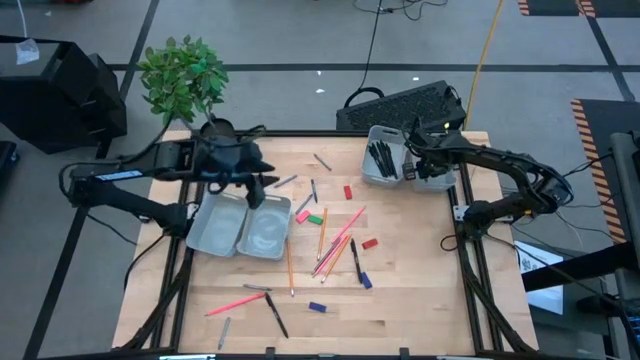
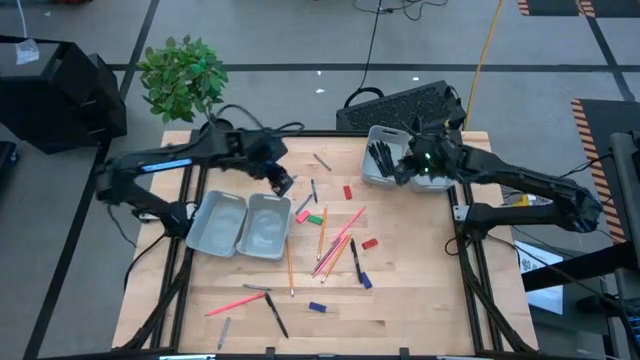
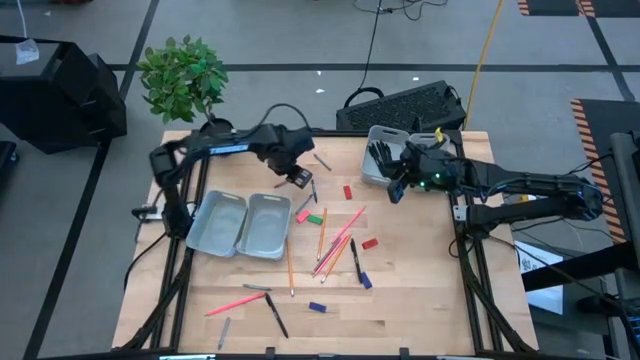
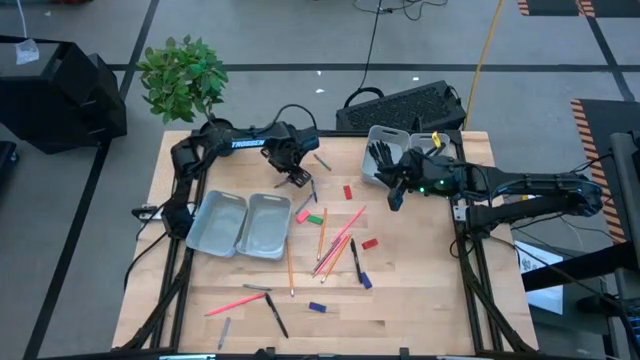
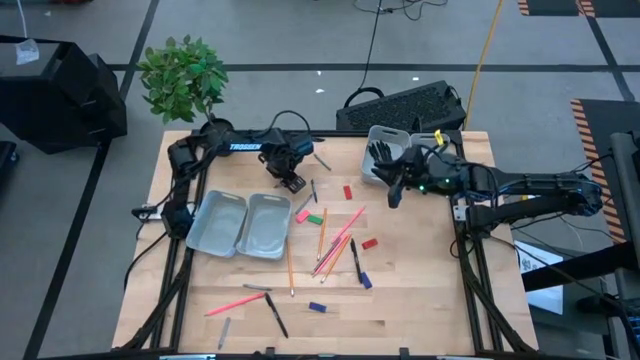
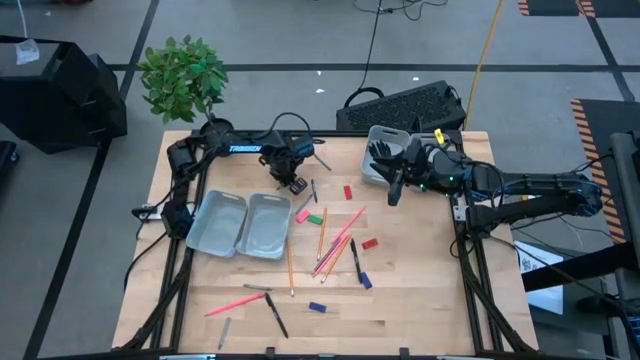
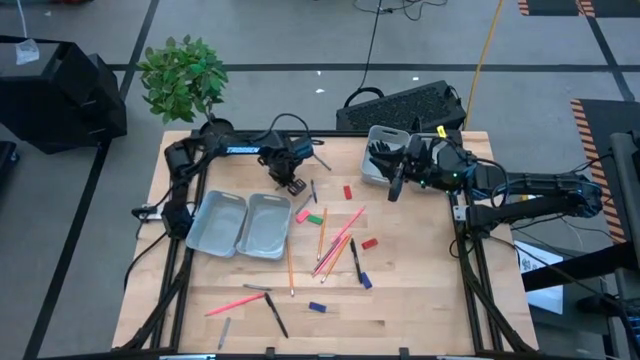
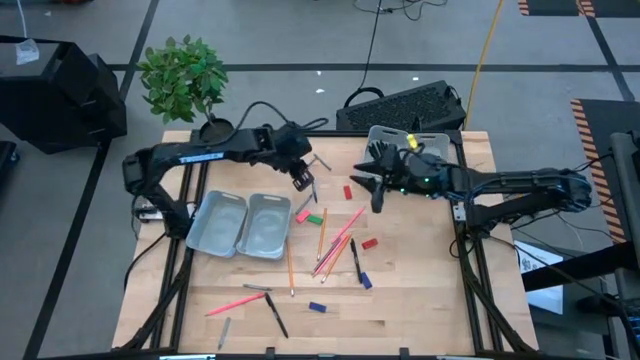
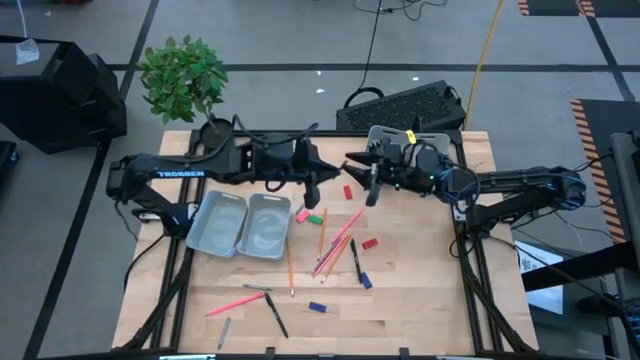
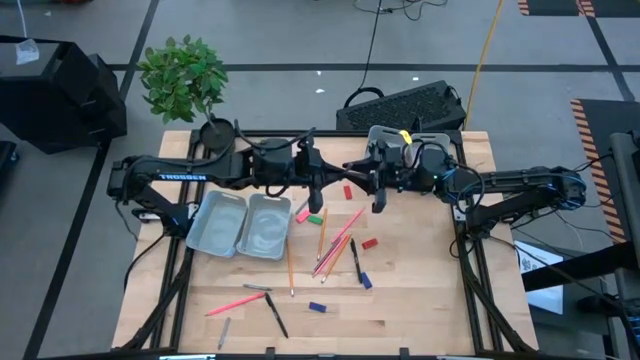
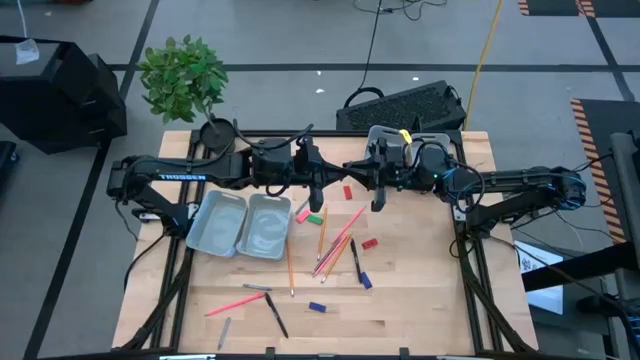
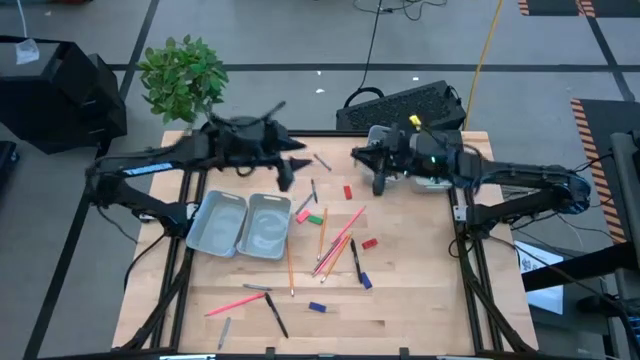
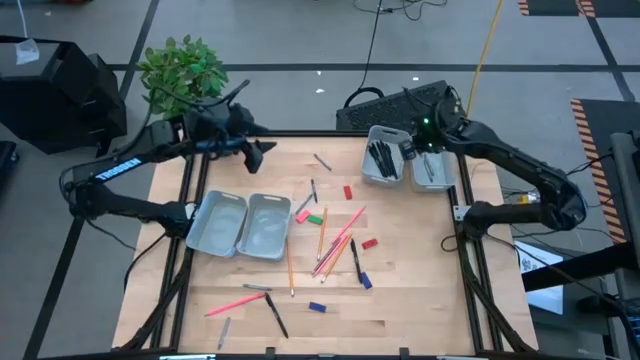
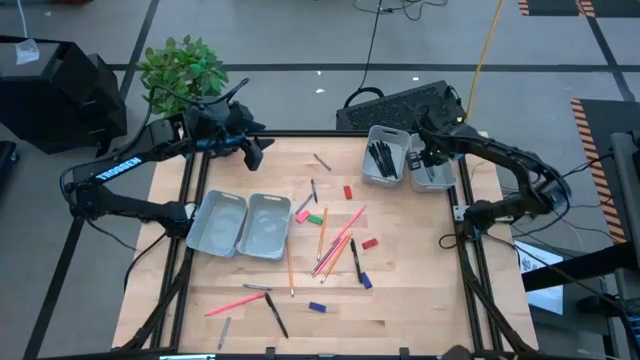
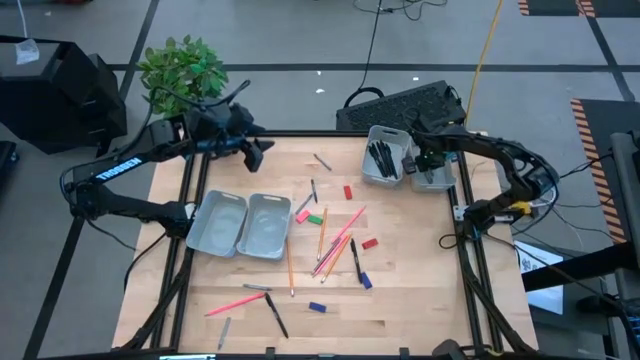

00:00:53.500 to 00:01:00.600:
Task: Sort crayons/erasers/pens/pencils in bins
Put the gray crayon into the top right gray bin

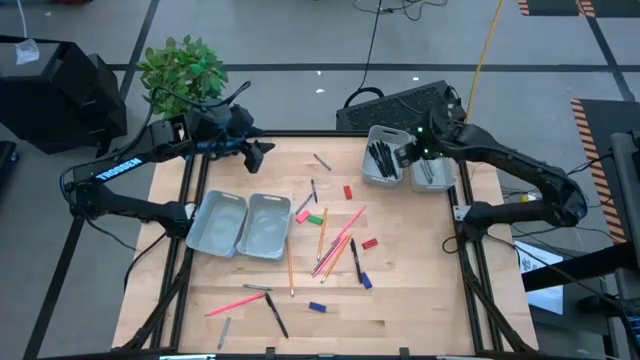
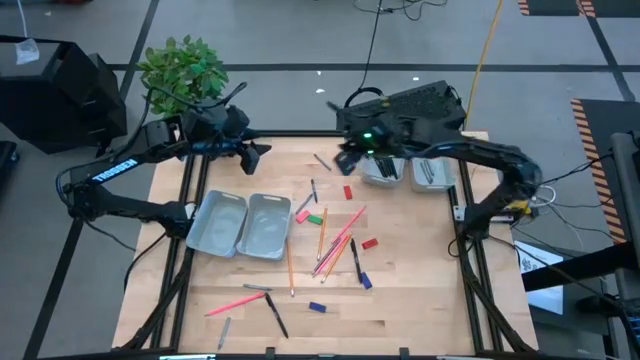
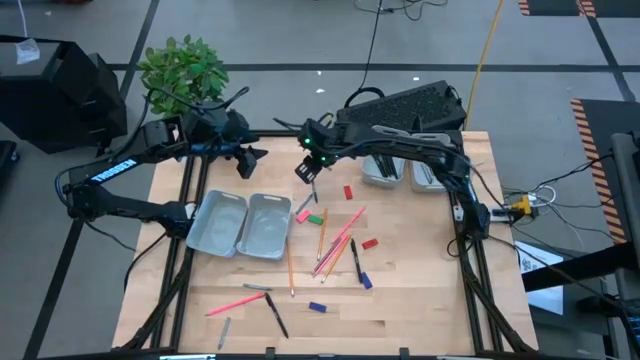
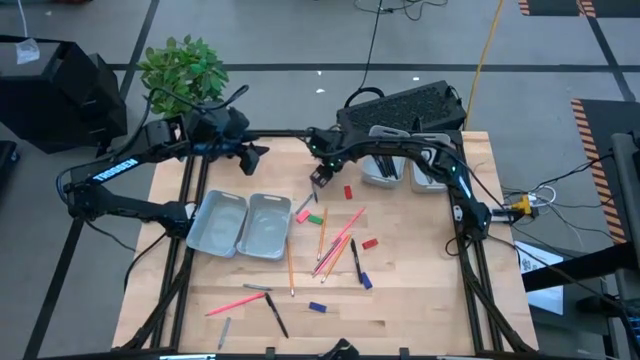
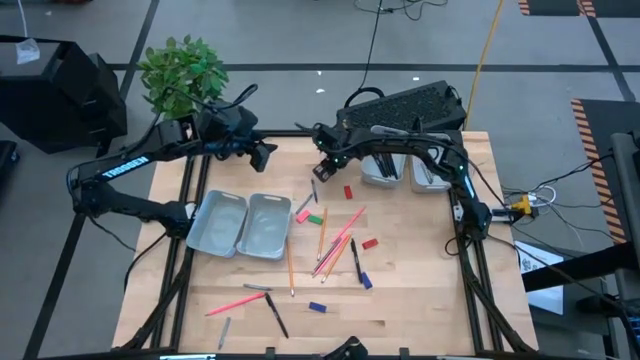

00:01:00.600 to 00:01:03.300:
Put the gray crayon into the top right gray bin

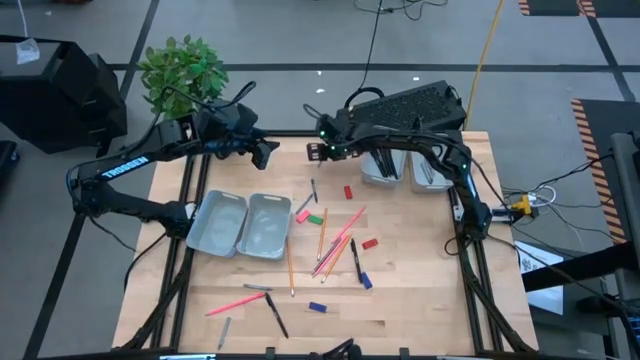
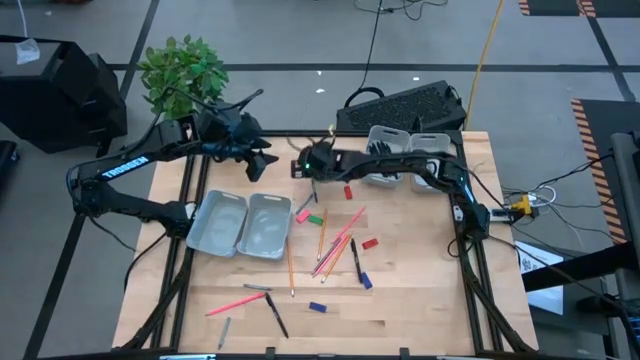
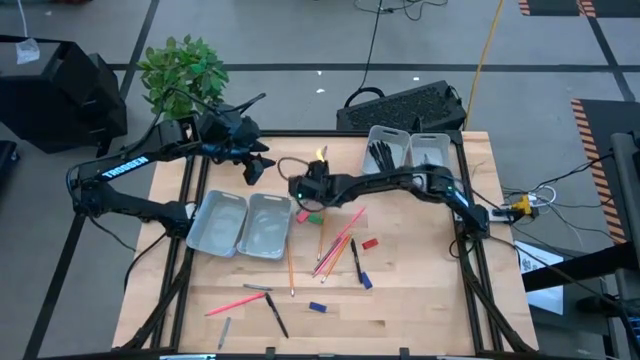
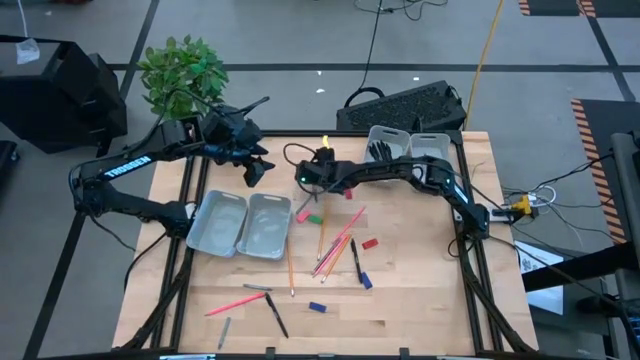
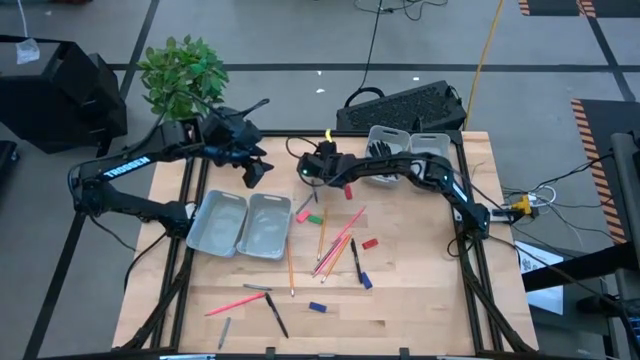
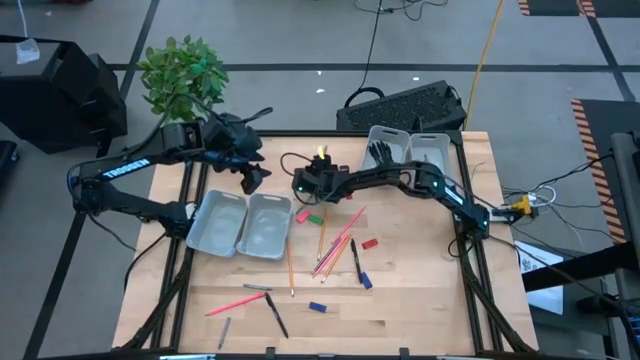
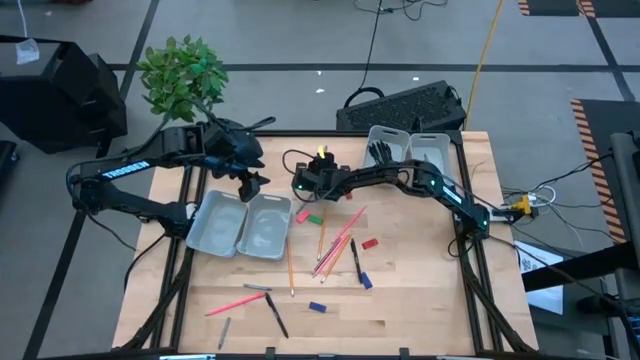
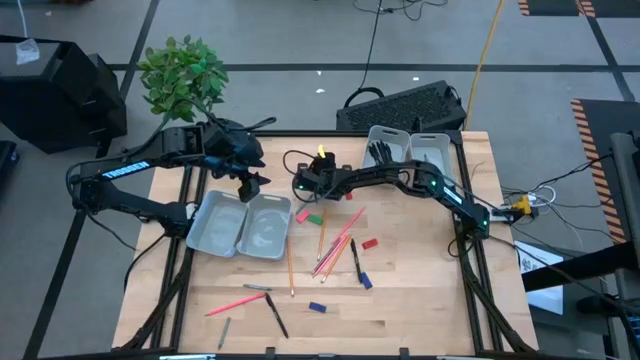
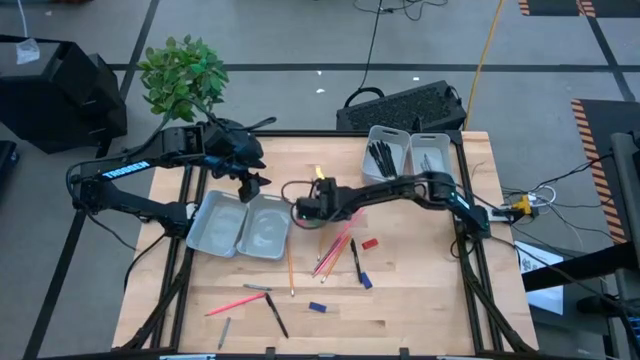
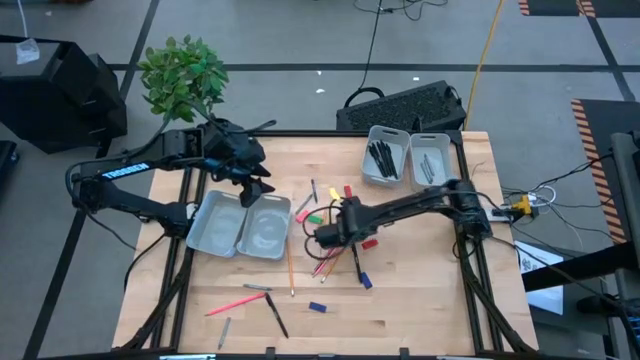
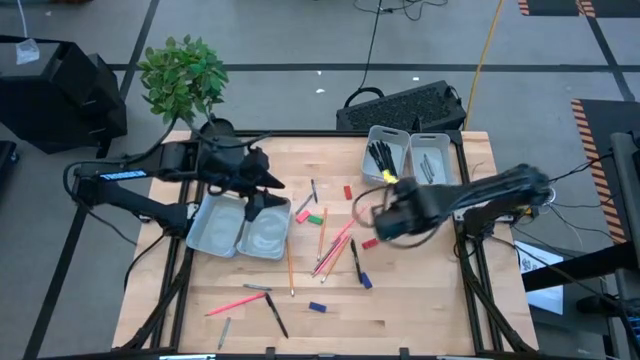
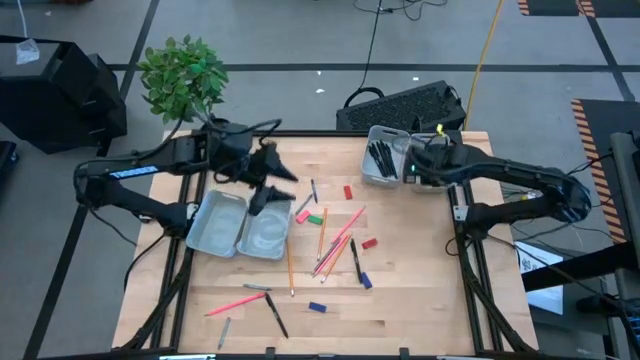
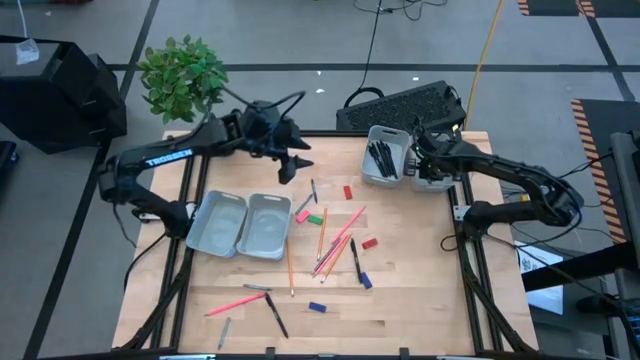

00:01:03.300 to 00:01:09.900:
Put the gray crayon into the top right gray bin

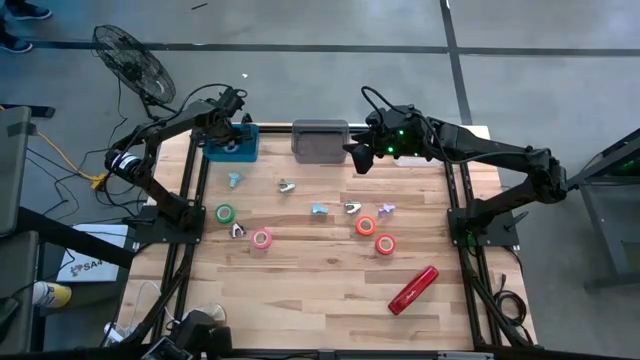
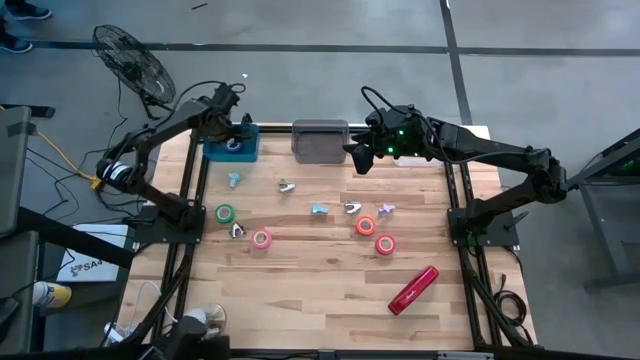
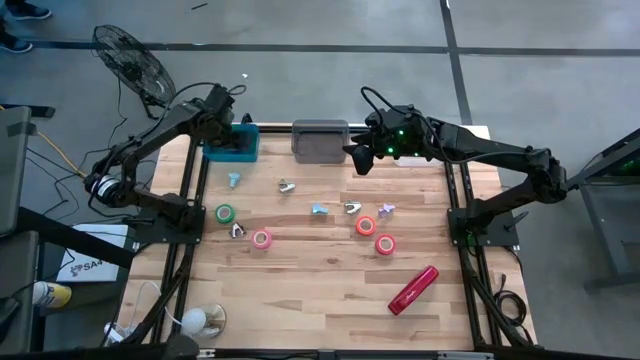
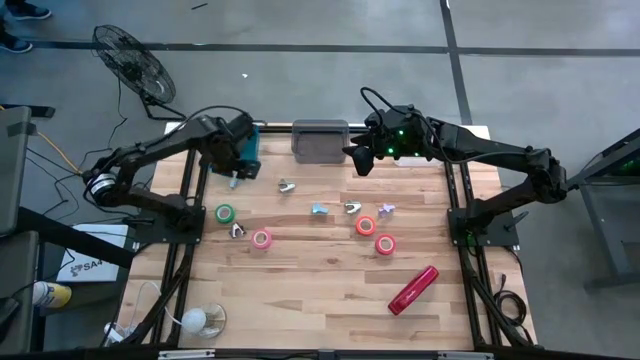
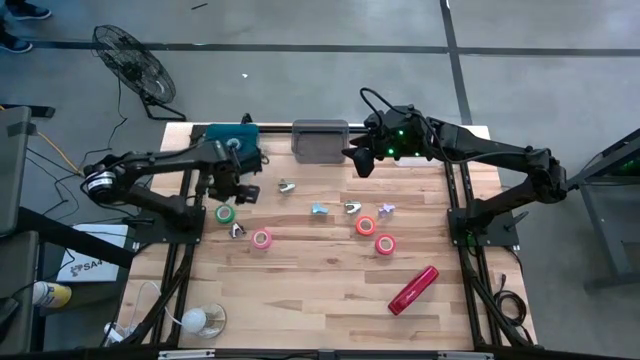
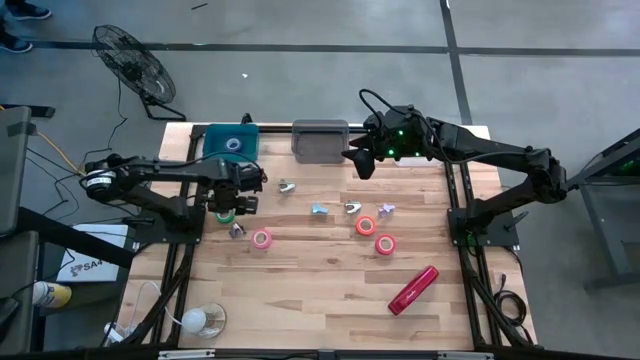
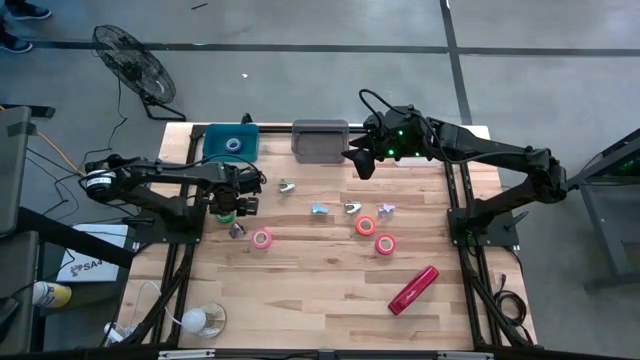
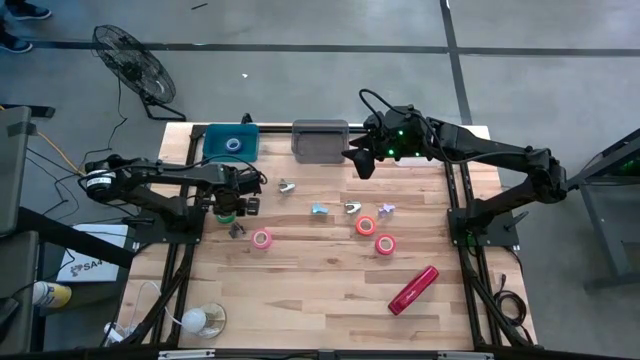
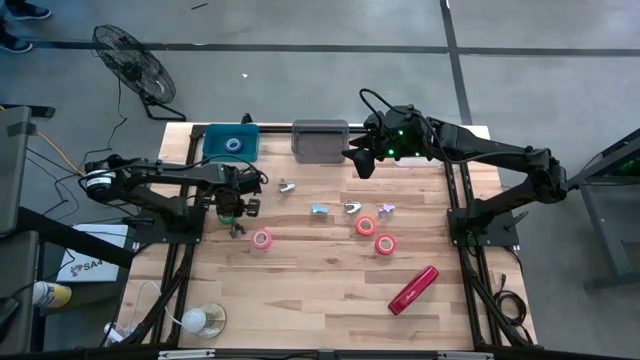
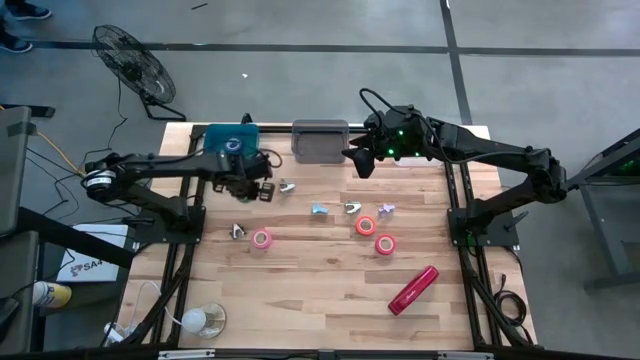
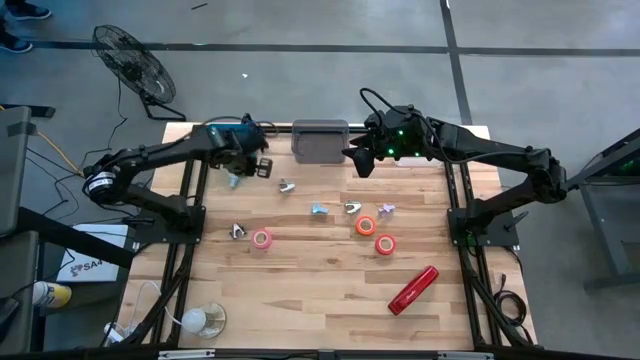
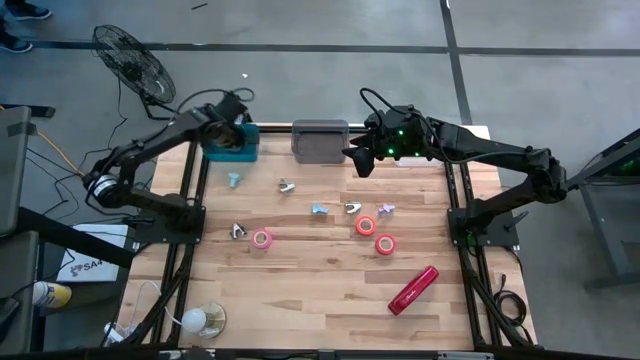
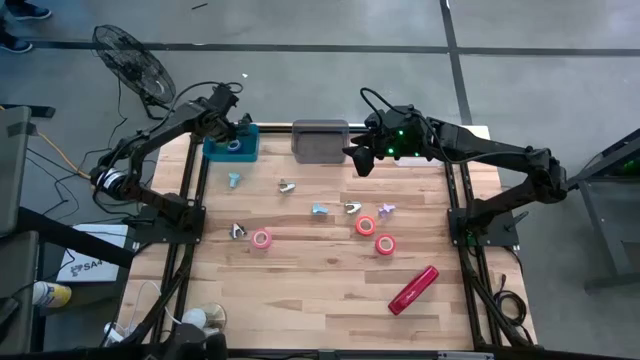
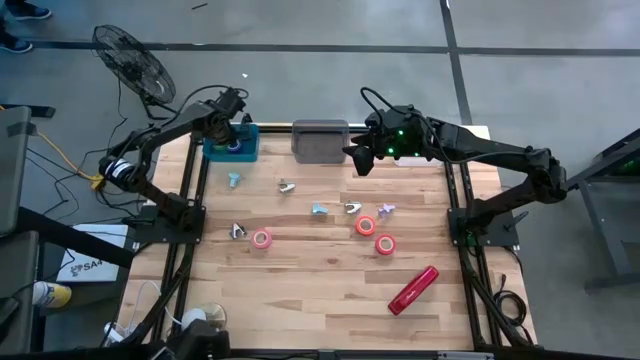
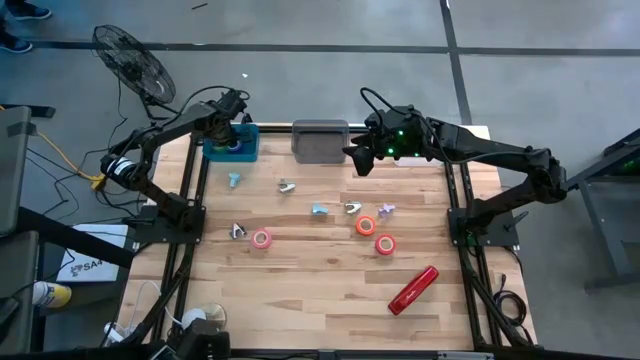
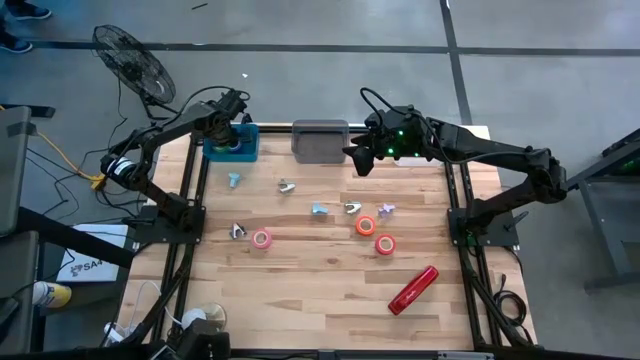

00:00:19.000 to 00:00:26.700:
Task: Pick and place Stapler, Stapler remover, tape
Put the green tape into the blue bin
